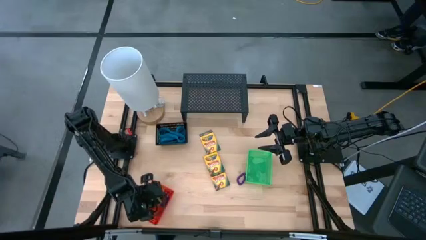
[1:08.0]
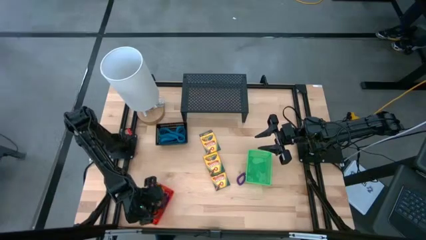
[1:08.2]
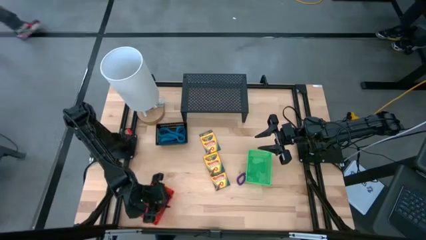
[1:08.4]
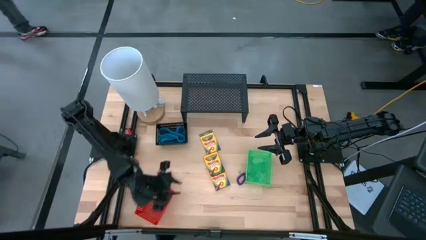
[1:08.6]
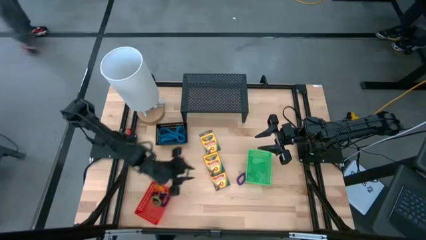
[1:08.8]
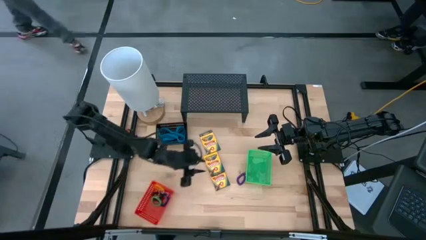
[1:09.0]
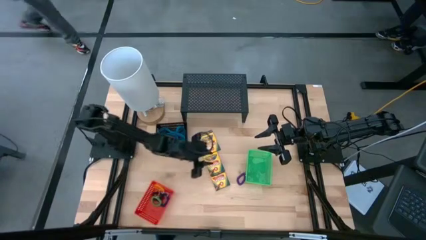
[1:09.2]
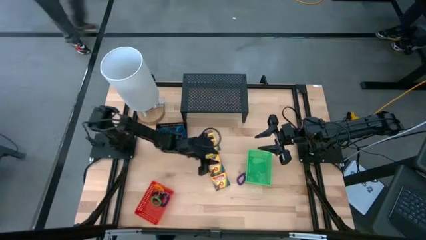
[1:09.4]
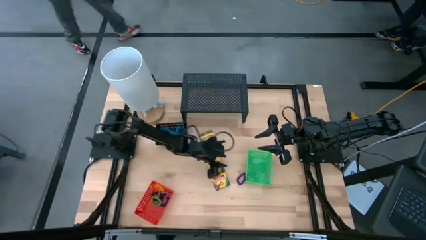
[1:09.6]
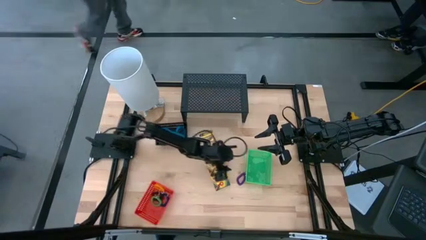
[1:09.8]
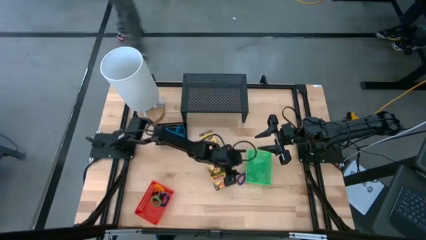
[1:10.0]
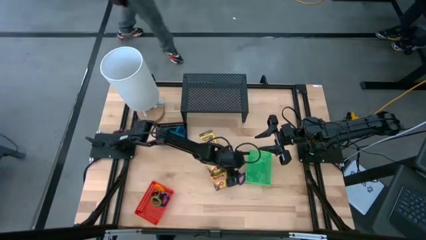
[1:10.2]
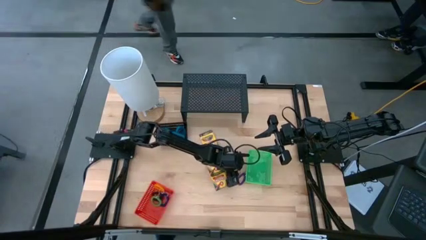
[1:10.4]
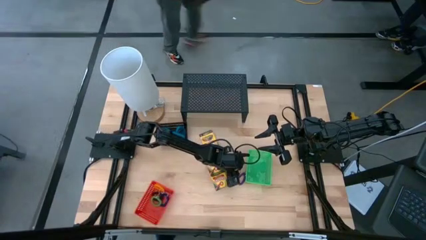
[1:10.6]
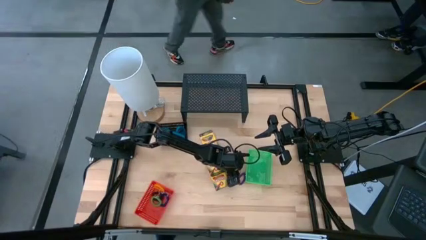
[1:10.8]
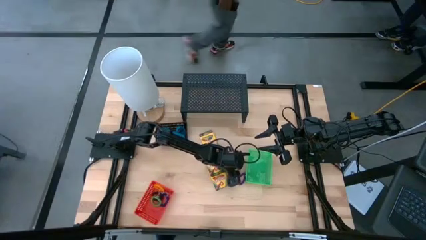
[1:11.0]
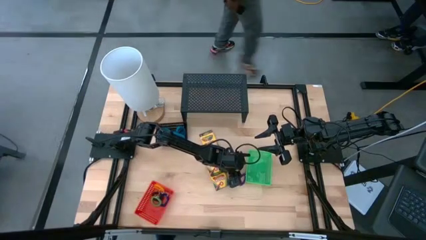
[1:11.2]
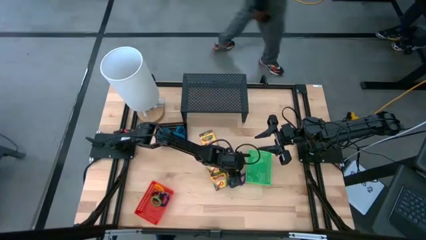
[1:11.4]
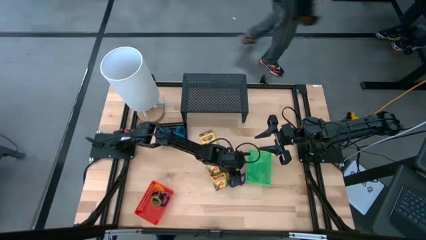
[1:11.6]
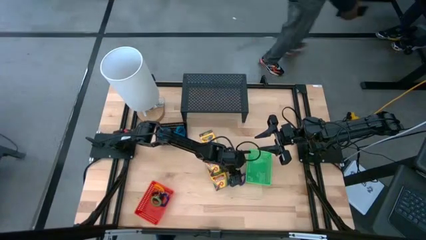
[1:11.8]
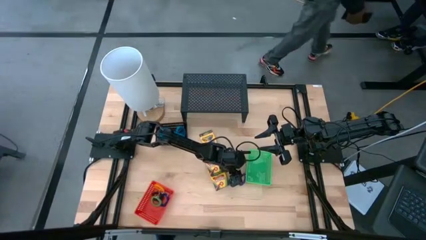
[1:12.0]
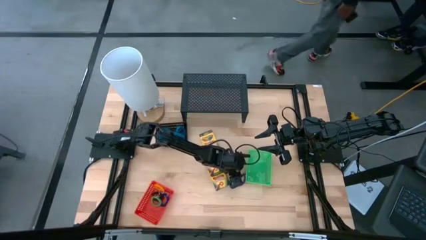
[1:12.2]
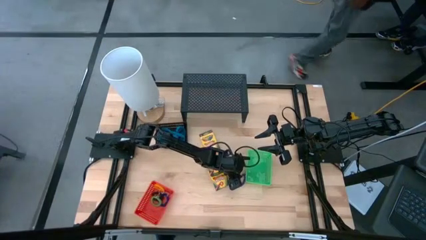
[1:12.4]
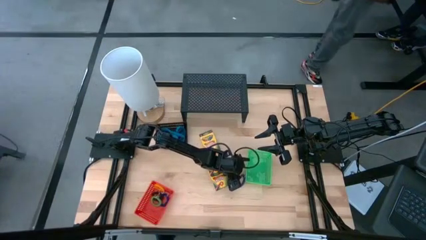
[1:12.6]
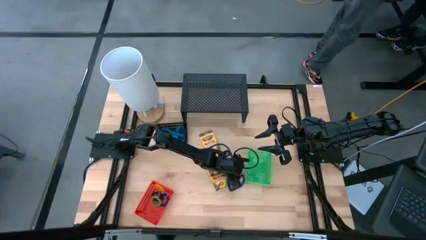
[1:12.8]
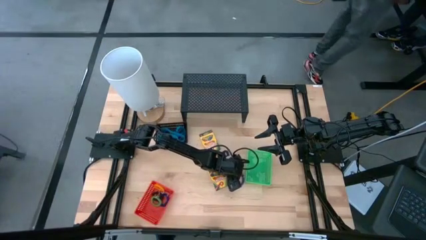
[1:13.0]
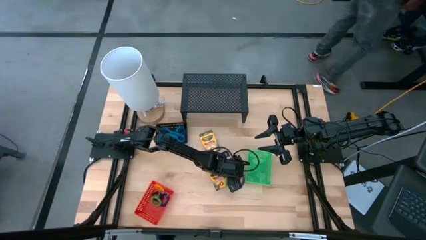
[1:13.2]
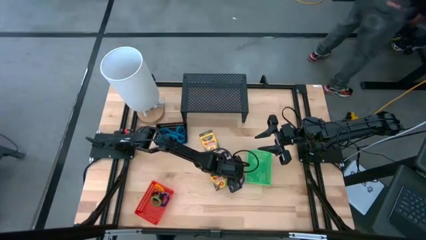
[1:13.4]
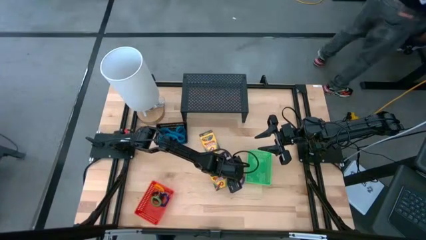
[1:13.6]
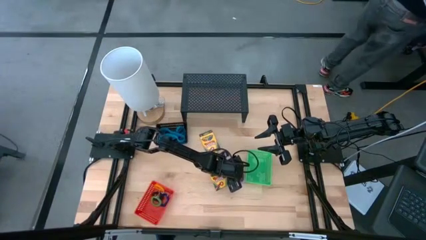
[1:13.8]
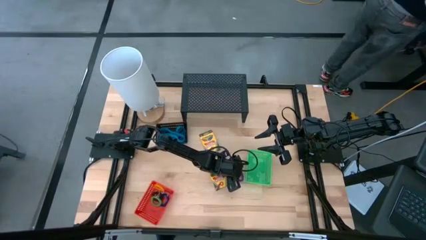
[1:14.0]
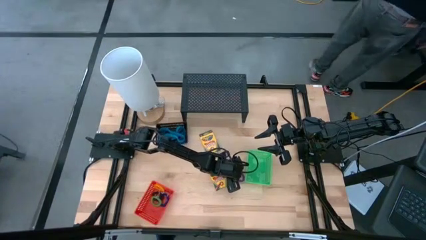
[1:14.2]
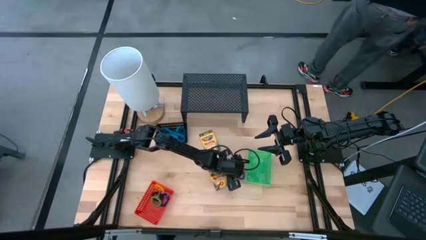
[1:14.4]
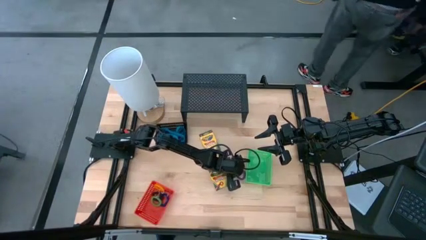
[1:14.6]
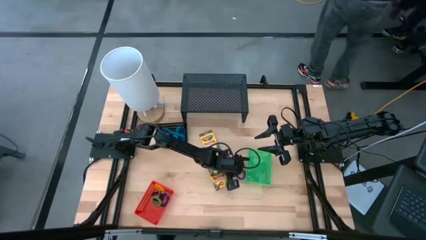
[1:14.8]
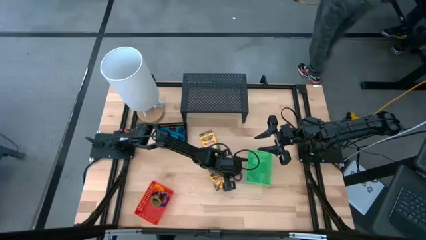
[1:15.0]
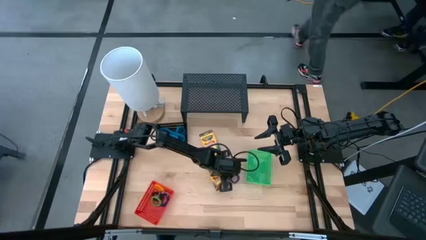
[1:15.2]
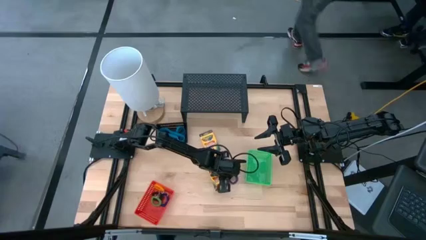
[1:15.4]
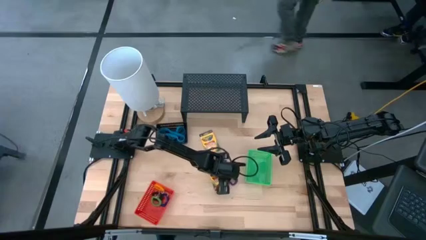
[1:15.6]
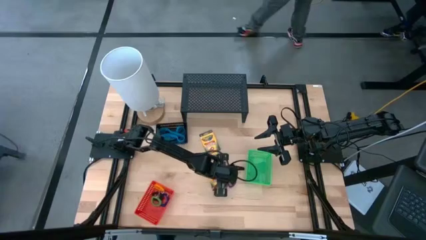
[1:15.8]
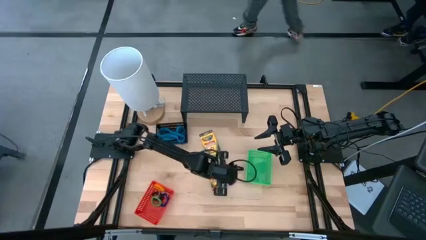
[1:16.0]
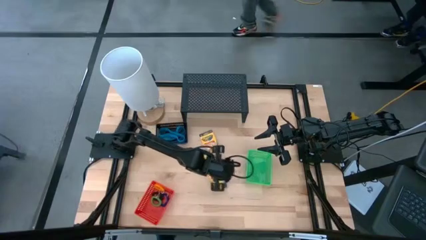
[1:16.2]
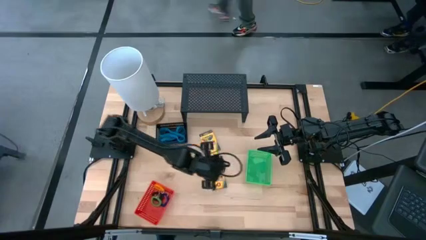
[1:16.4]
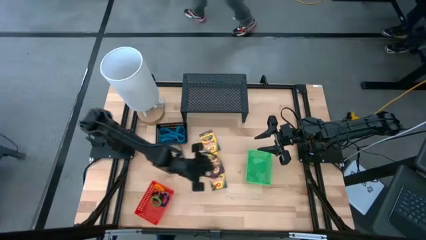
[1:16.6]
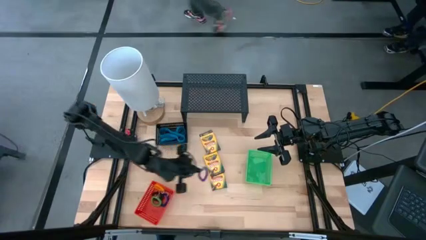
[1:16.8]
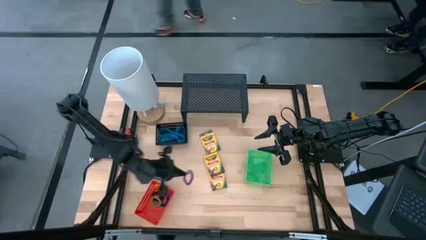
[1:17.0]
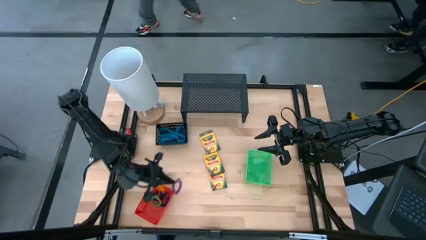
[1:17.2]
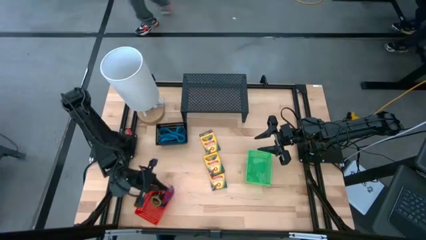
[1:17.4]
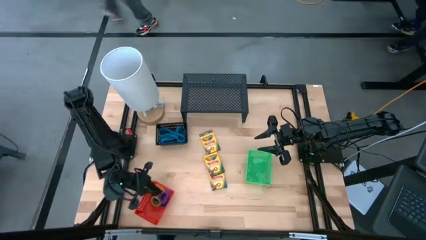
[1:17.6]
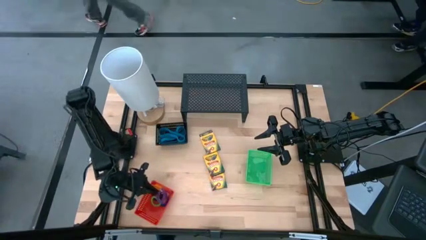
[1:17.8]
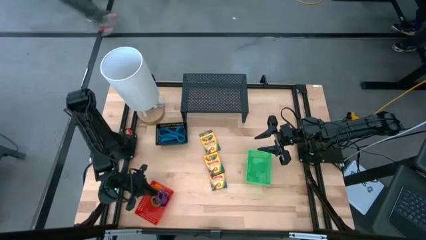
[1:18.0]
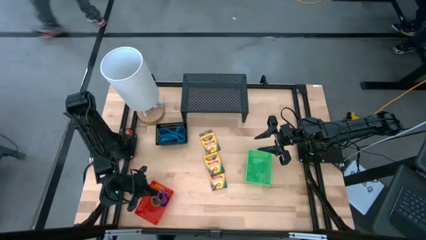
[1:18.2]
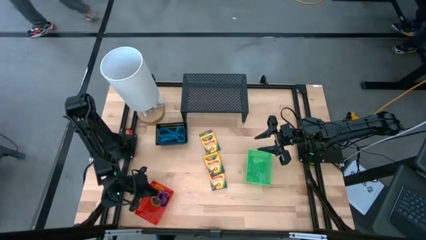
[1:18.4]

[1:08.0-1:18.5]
Task: Pick & Place Office Desk Supplies
Put the purple spring keychain into the red bin

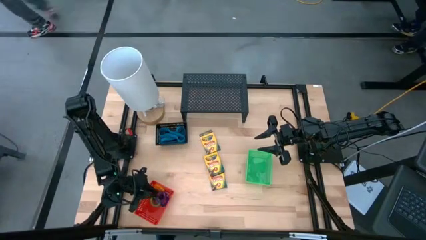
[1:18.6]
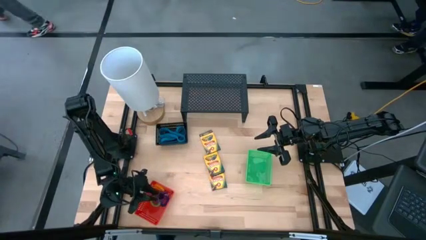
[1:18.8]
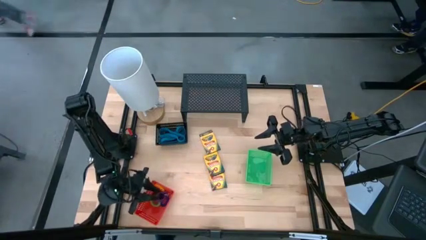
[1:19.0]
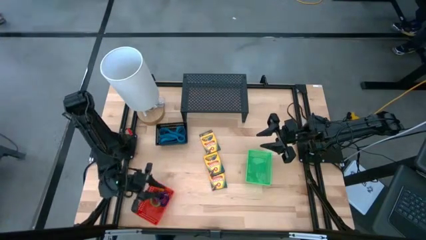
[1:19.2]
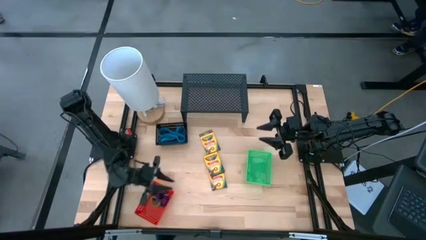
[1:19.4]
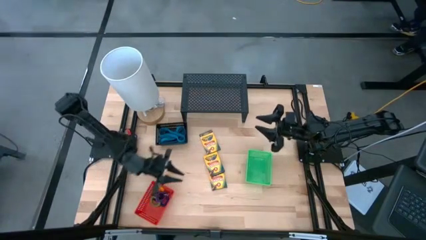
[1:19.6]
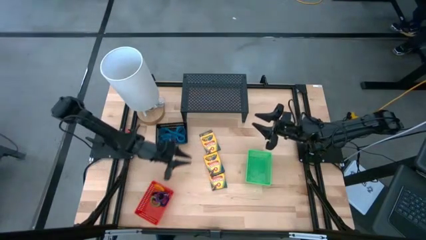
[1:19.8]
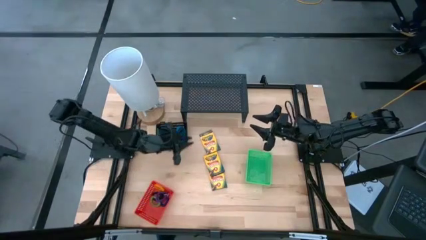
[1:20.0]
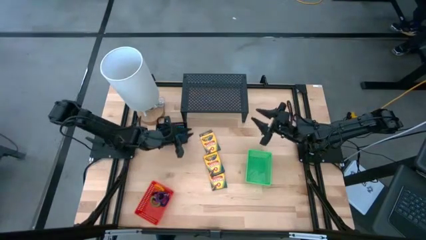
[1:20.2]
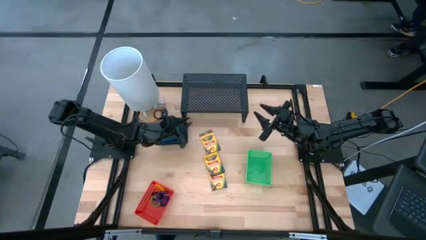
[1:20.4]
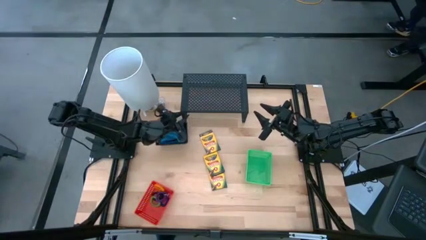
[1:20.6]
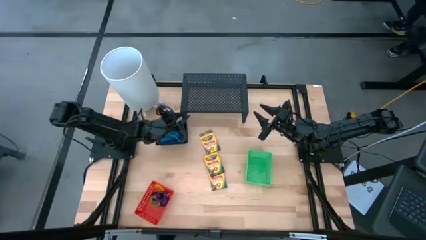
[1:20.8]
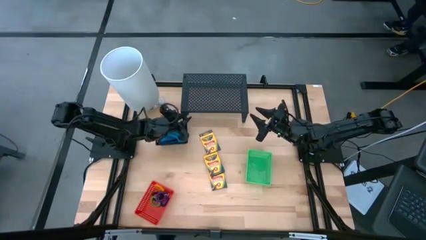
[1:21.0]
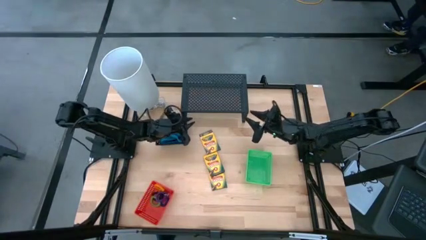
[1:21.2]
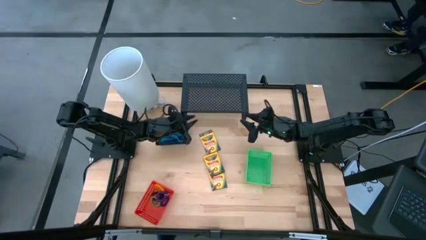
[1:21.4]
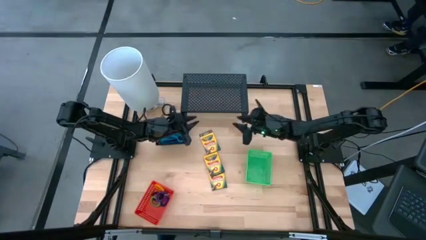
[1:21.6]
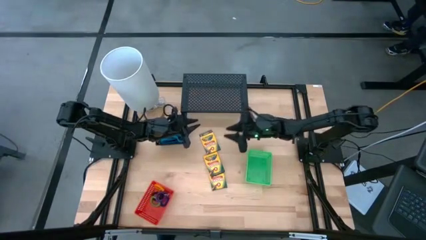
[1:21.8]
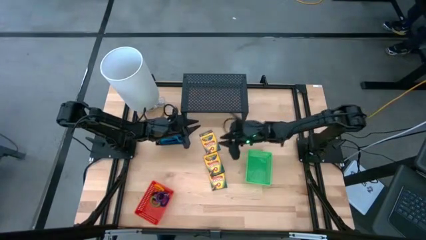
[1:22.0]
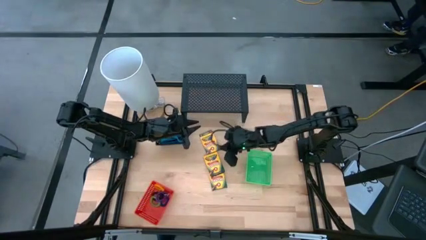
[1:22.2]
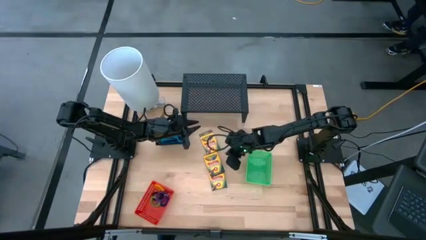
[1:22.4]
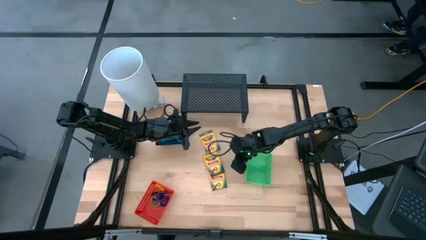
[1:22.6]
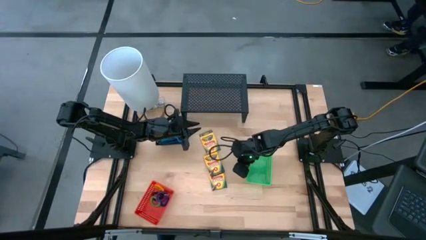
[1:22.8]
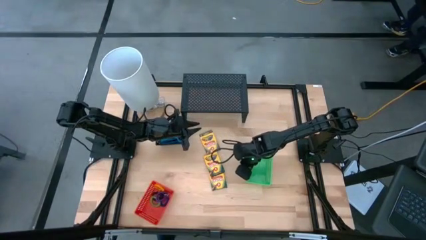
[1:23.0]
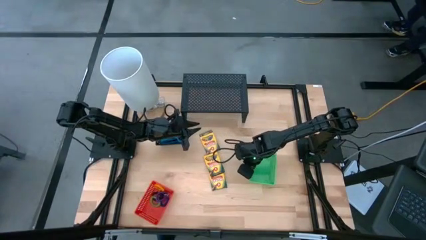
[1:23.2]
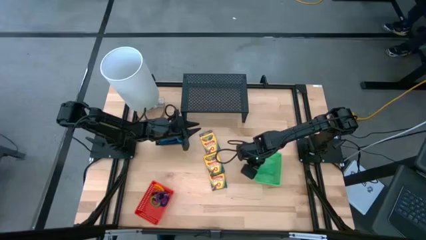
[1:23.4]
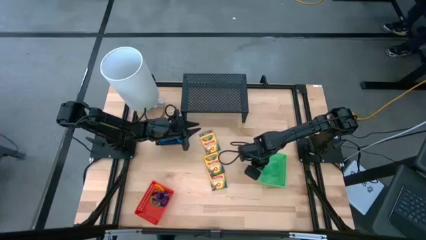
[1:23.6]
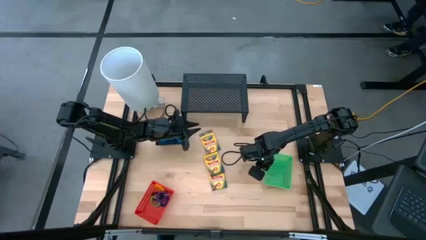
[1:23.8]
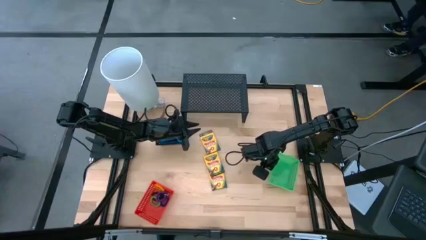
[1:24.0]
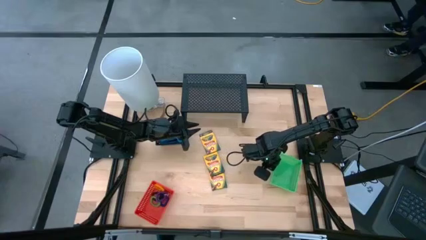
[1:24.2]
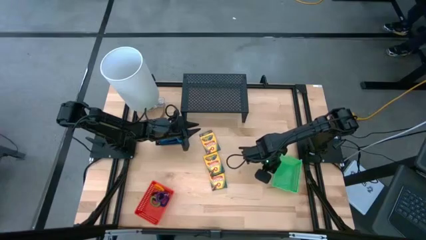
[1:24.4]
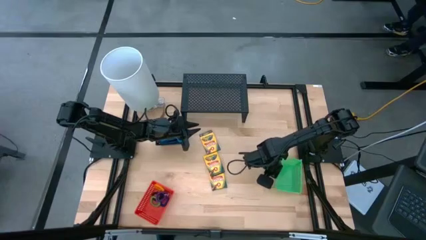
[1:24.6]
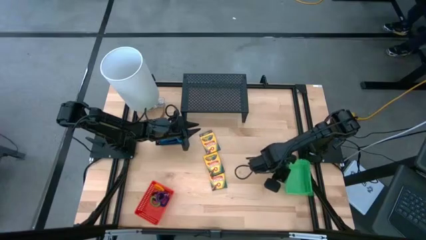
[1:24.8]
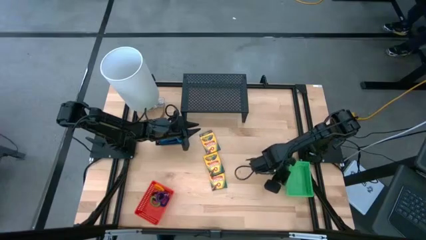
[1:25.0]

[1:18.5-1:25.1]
Adjust the green bin
